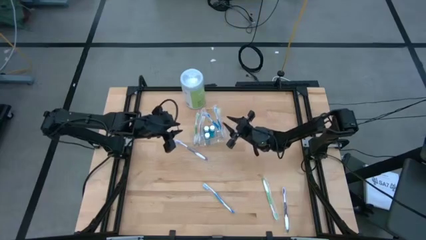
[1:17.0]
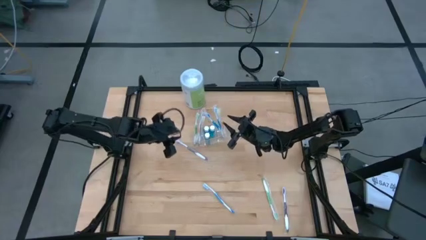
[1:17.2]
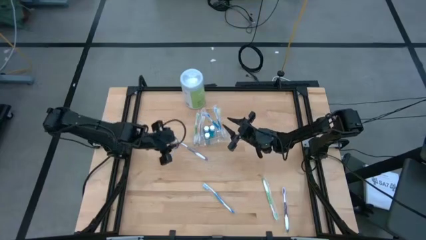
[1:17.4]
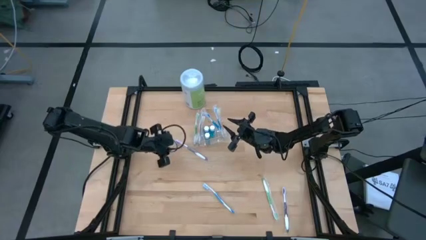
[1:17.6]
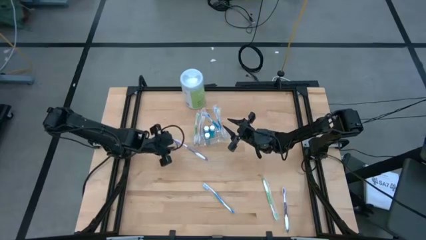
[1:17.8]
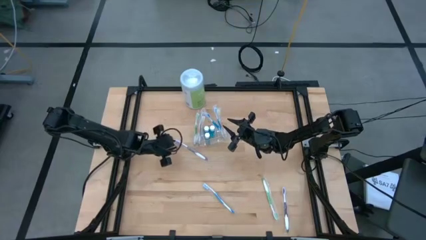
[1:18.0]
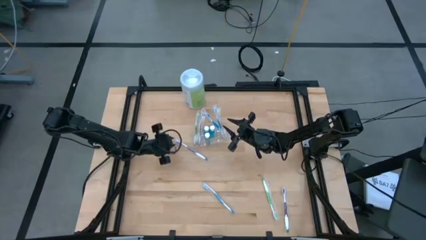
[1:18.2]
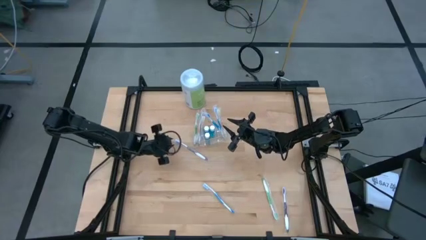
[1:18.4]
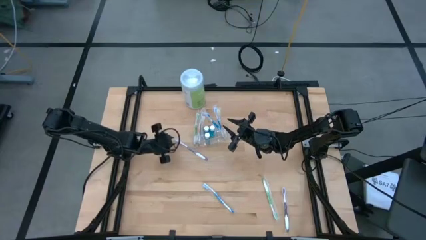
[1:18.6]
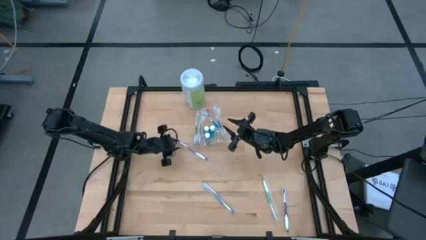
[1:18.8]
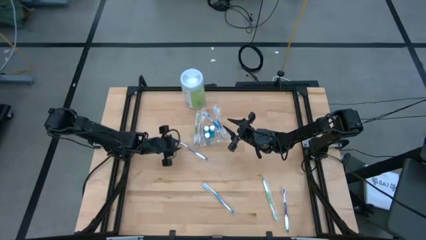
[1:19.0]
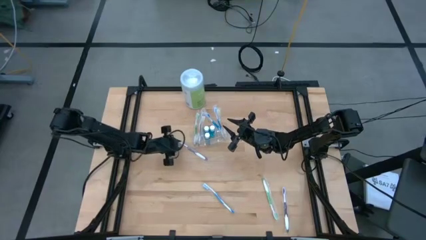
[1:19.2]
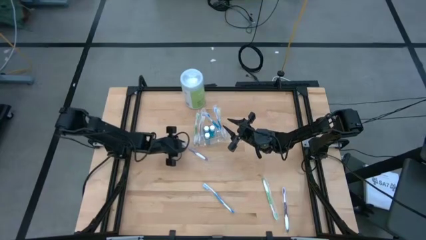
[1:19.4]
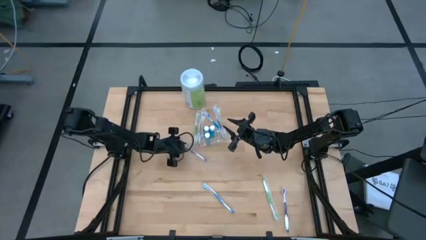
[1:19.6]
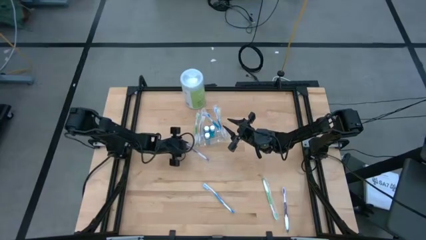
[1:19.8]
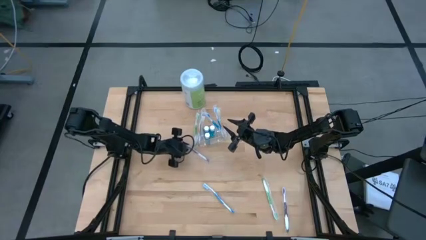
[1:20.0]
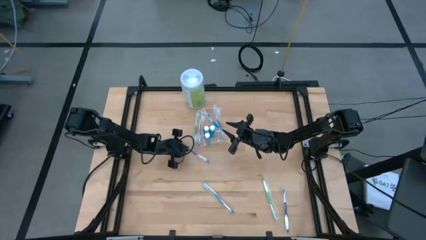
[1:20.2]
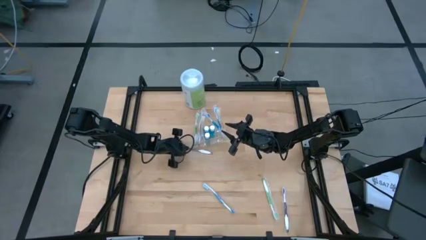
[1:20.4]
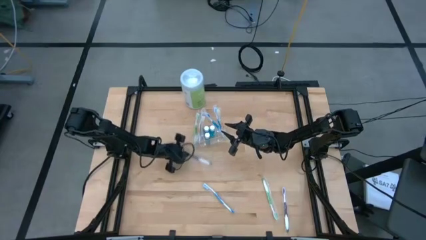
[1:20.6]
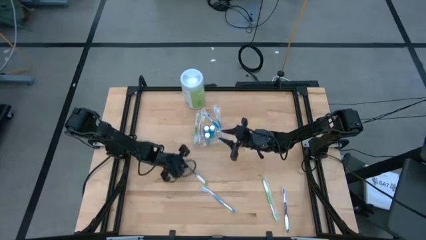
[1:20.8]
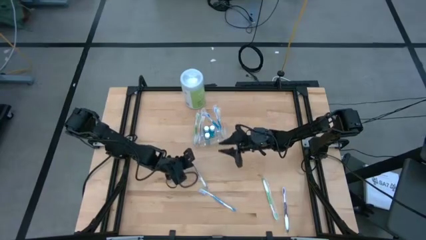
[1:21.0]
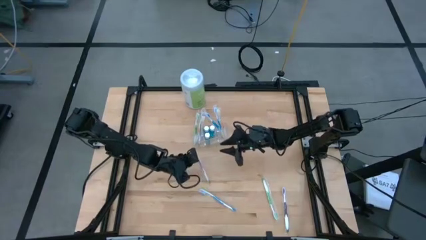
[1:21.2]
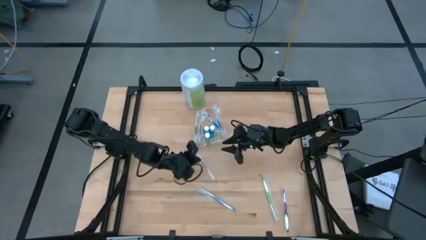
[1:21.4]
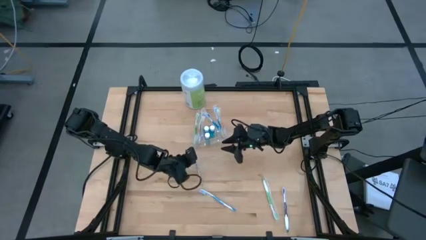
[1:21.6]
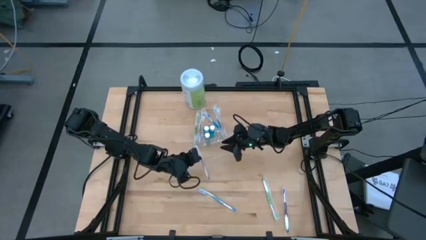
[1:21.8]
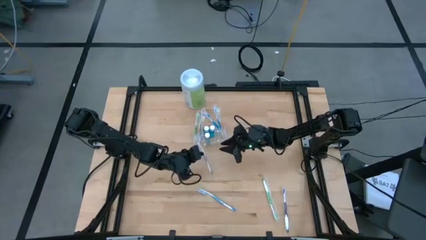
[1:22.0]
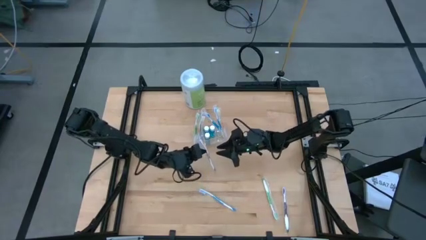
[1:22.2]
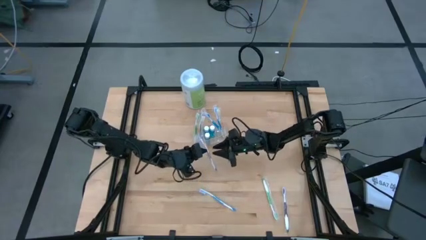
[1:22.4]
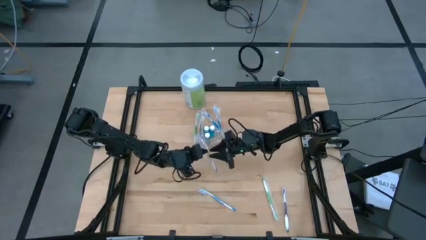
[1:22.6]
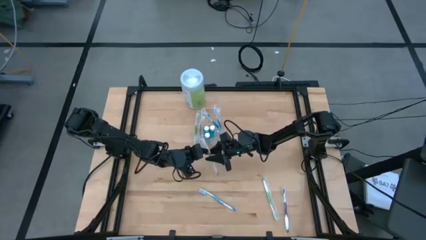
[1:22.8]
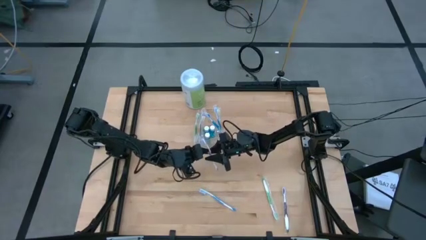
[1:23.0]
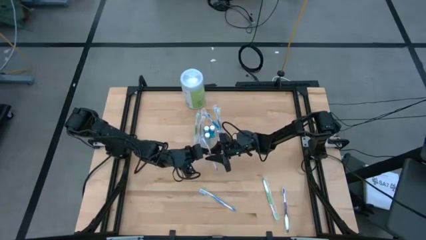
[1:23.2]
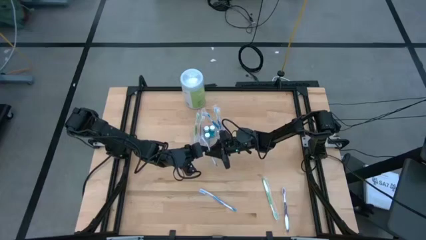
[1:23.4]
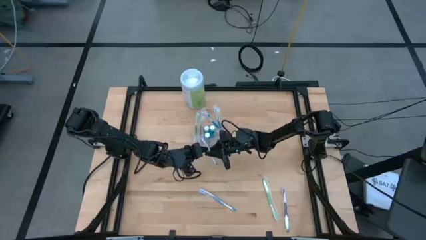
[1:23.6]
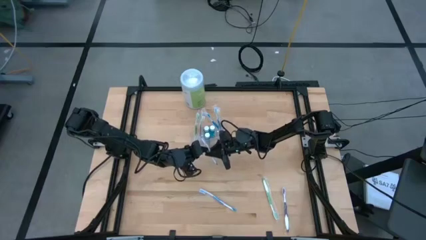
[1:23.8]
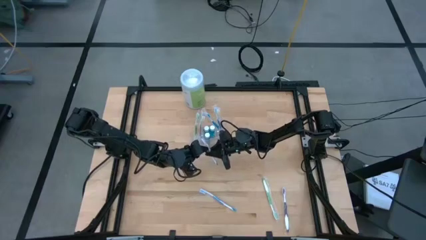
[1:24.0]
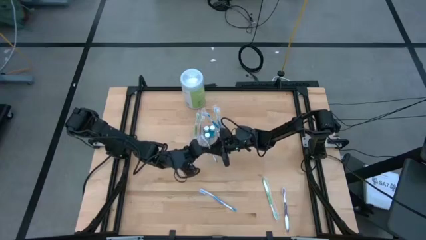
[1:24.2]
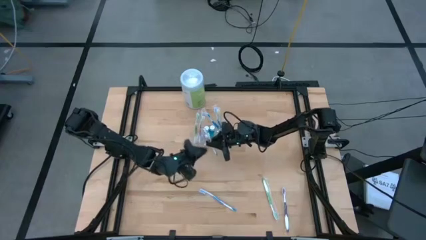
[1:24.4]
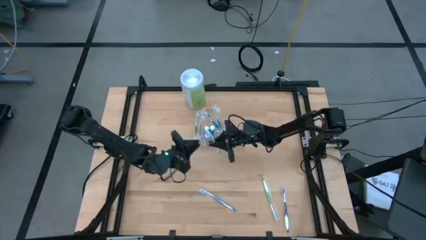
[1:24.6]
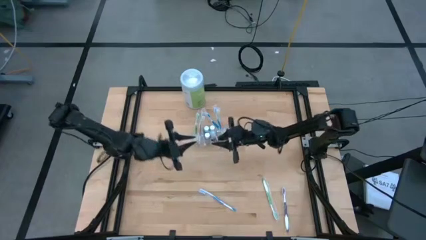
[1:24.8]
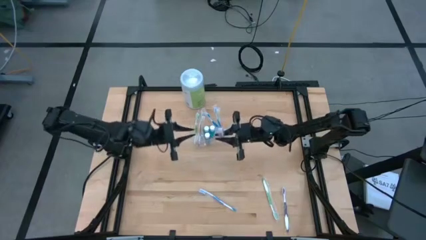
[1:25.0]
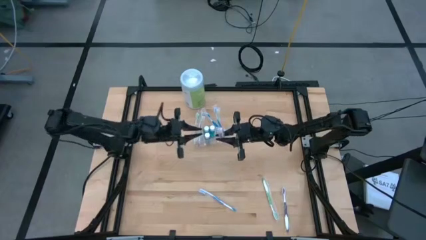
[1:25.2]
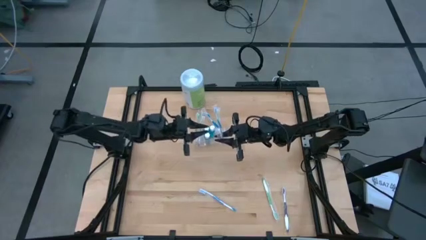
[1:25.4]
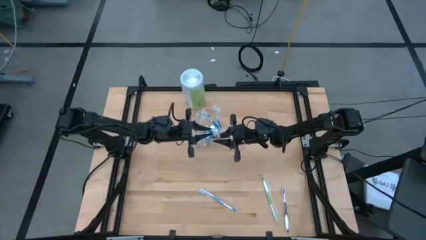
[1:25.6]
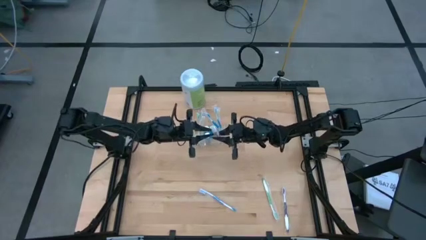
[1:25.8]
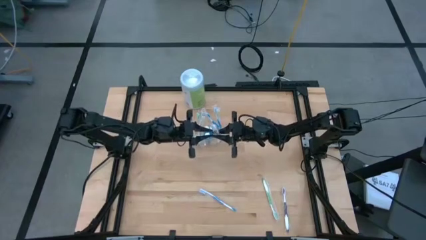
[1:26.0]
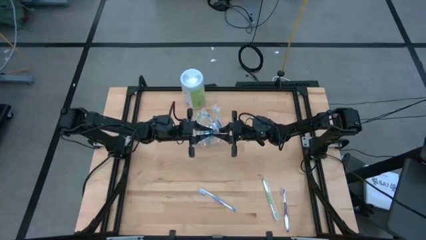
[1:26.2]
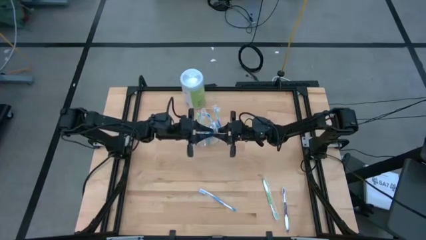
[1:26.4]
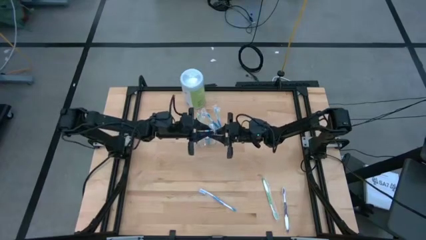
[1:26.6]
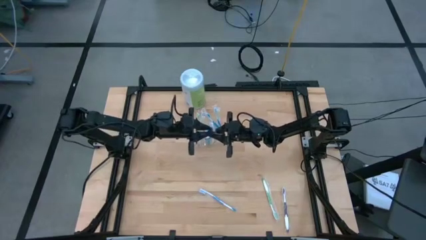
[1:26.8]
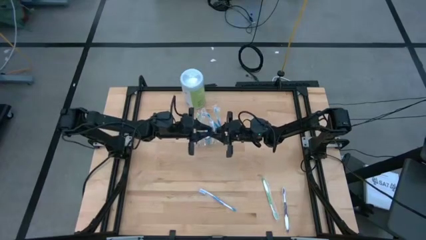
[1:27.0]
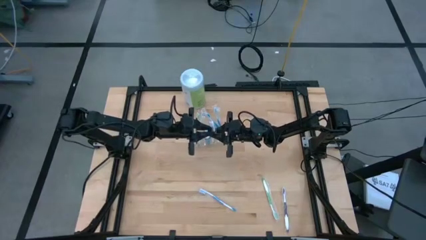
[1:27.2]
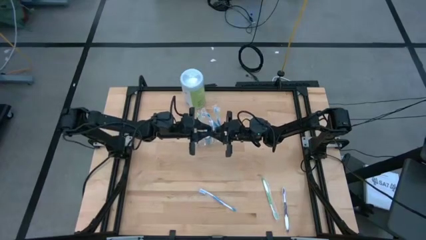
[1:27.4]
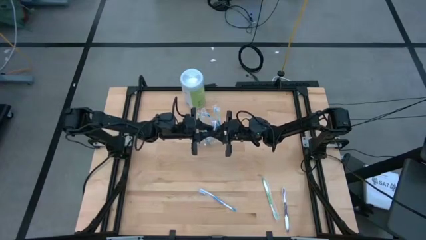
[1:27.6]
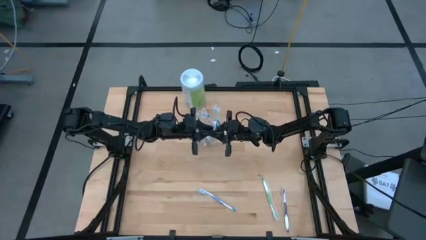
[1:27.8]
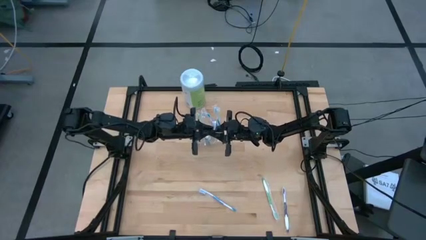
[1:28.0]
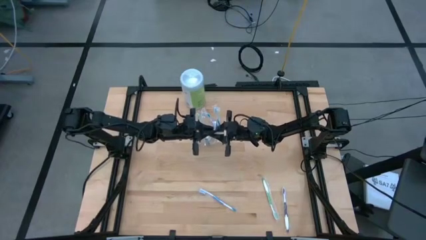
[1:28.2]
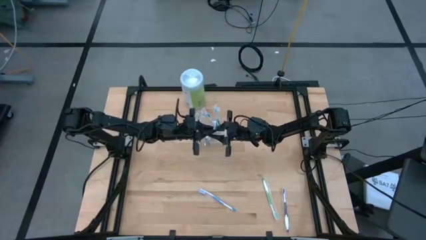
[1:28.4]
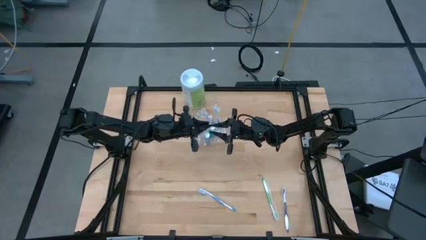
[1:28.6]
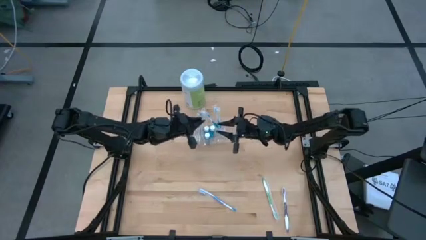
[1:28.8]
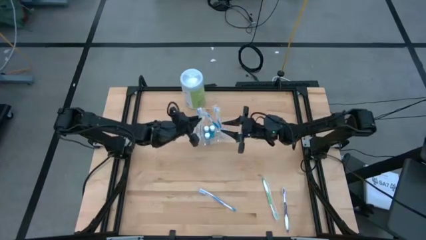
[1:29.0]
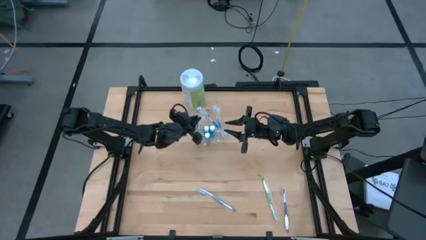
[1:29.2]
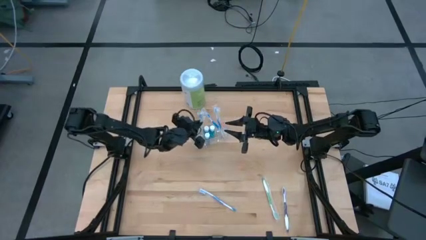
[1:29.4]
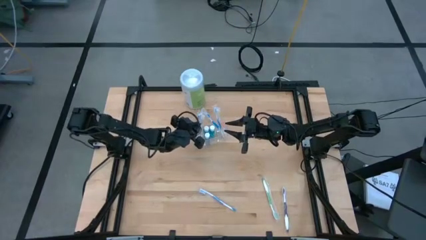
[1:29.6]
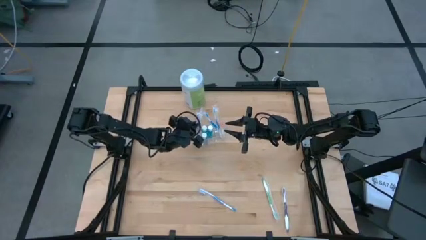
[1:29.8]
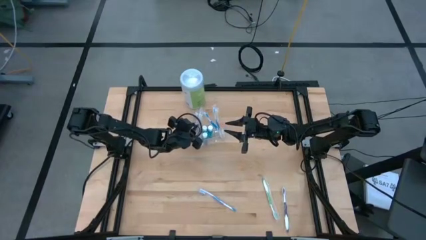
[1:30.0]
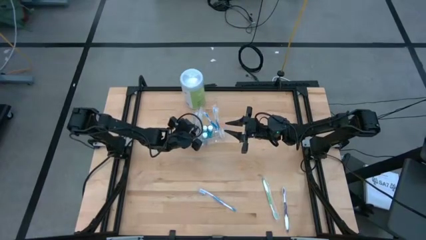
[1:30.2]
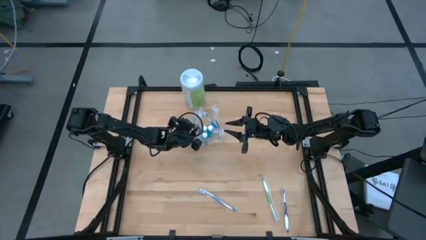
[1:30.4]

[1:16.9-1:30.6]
Task: Pick & Place toothbrushing station
Put the left violet toothbrush into the left side of the transparent organizer
